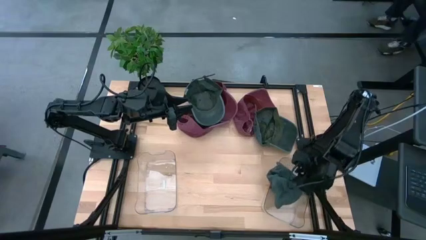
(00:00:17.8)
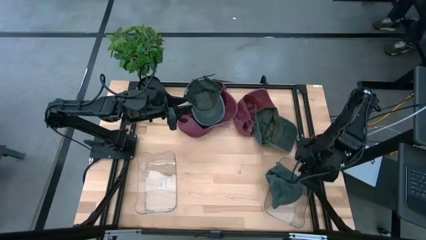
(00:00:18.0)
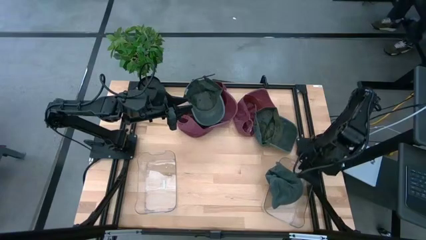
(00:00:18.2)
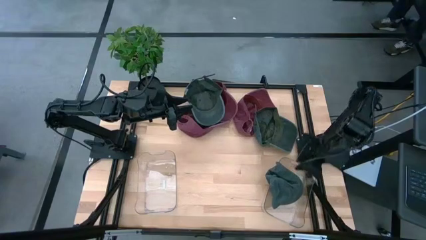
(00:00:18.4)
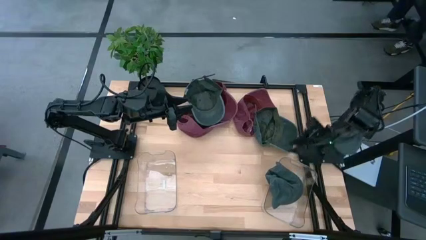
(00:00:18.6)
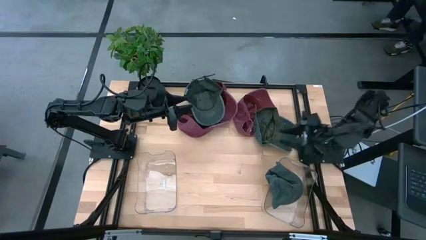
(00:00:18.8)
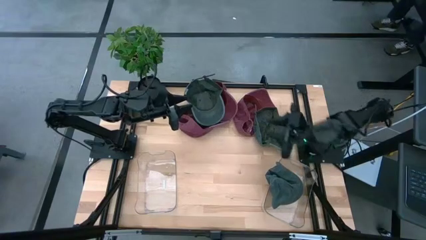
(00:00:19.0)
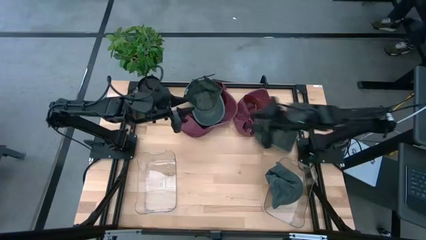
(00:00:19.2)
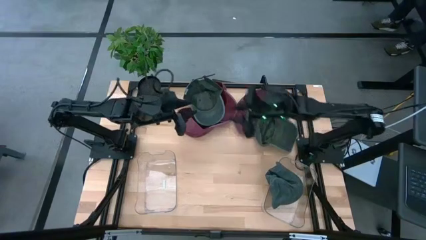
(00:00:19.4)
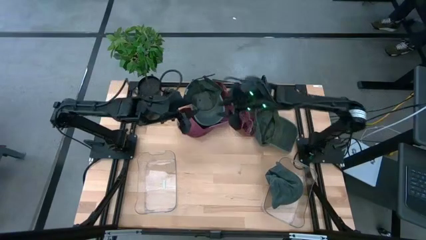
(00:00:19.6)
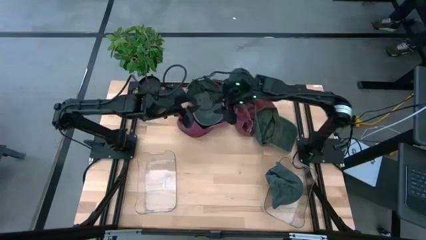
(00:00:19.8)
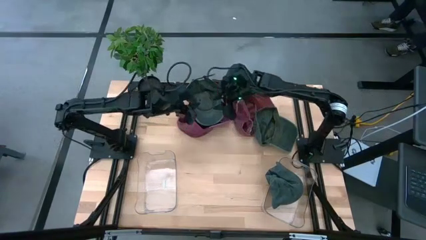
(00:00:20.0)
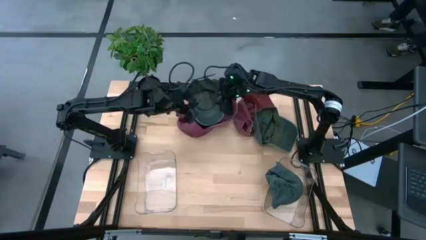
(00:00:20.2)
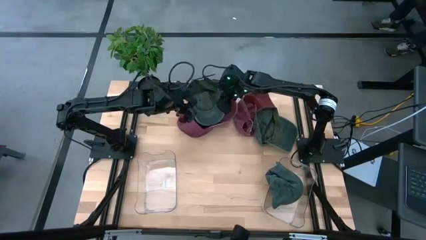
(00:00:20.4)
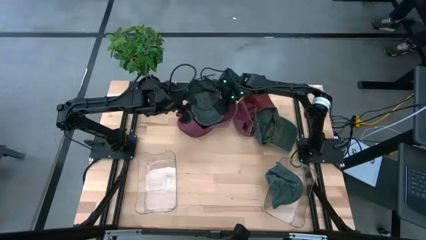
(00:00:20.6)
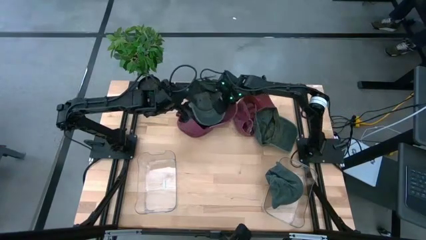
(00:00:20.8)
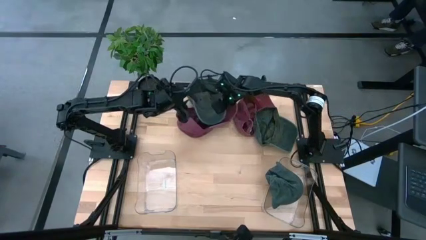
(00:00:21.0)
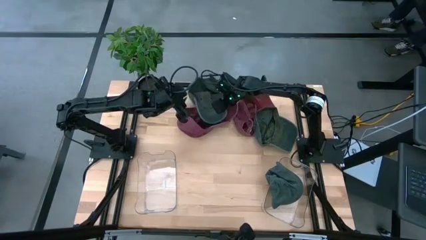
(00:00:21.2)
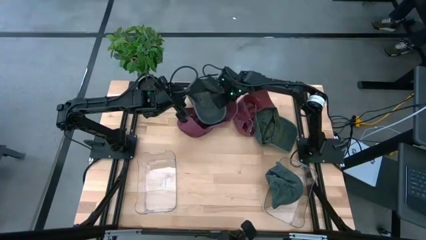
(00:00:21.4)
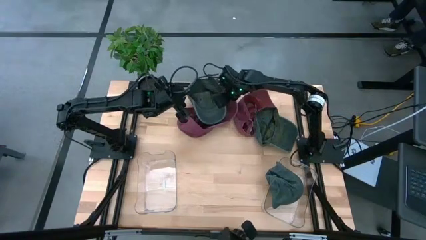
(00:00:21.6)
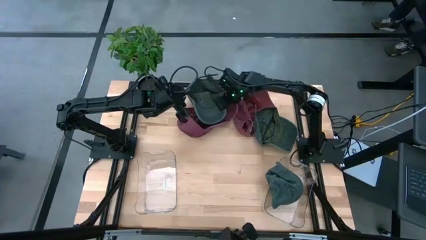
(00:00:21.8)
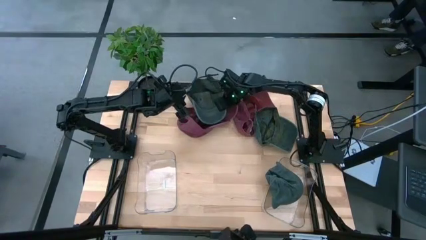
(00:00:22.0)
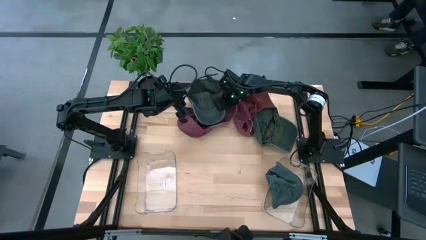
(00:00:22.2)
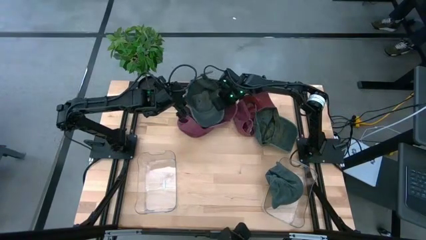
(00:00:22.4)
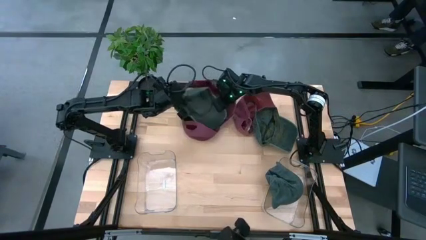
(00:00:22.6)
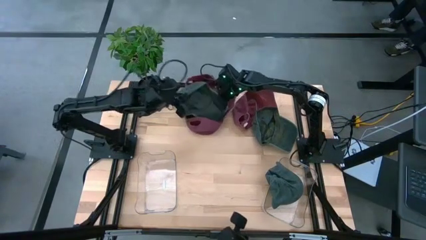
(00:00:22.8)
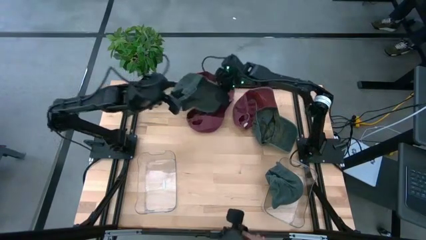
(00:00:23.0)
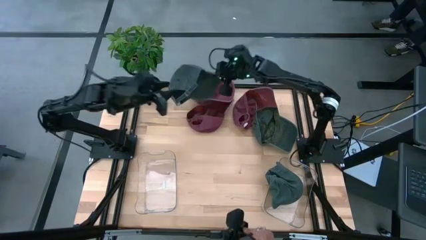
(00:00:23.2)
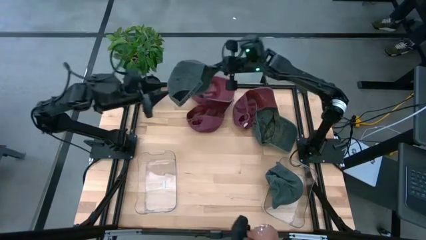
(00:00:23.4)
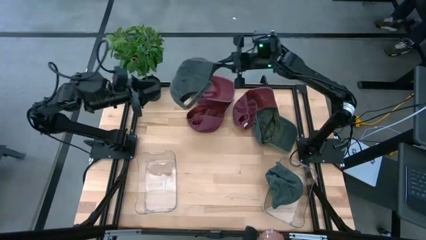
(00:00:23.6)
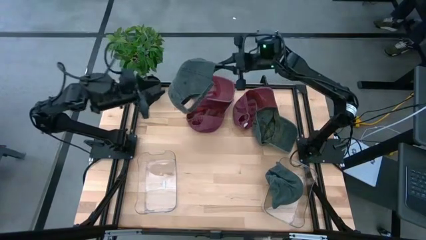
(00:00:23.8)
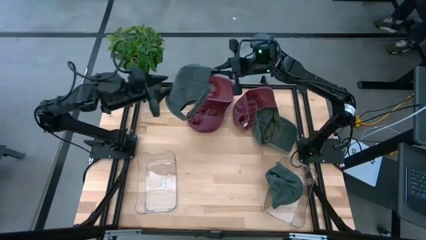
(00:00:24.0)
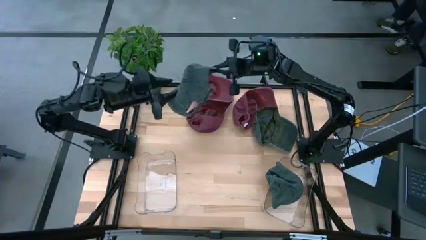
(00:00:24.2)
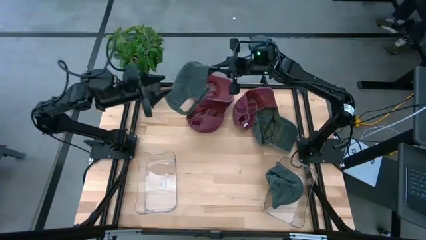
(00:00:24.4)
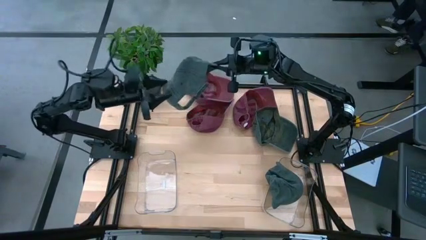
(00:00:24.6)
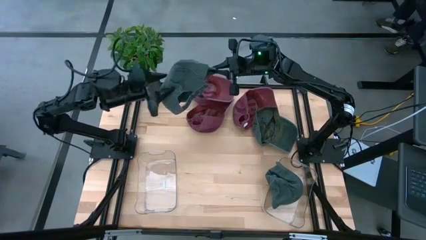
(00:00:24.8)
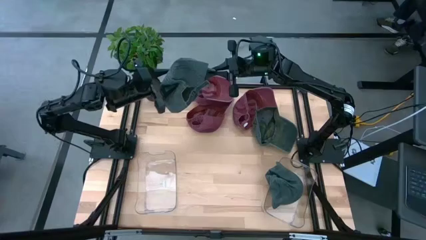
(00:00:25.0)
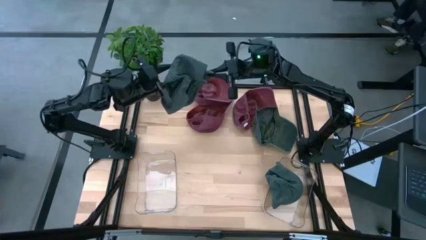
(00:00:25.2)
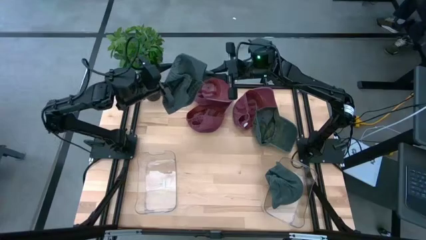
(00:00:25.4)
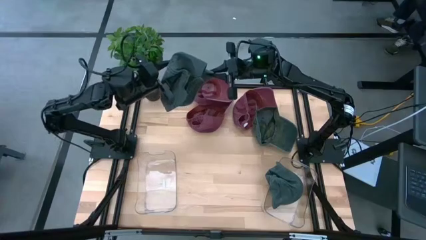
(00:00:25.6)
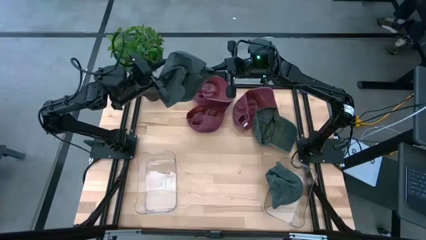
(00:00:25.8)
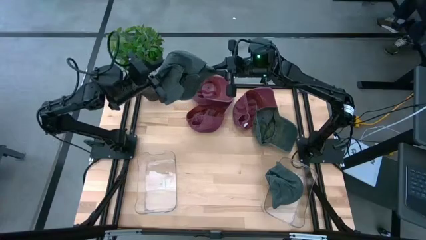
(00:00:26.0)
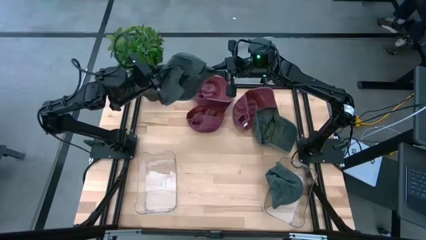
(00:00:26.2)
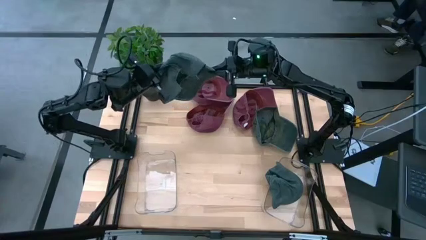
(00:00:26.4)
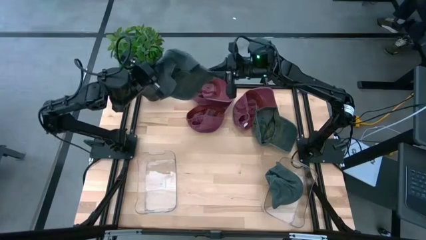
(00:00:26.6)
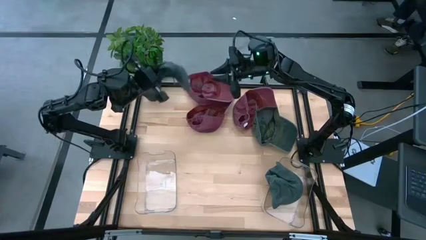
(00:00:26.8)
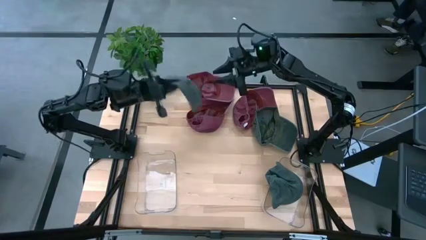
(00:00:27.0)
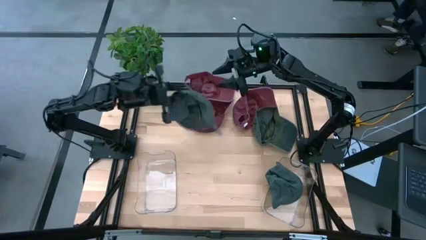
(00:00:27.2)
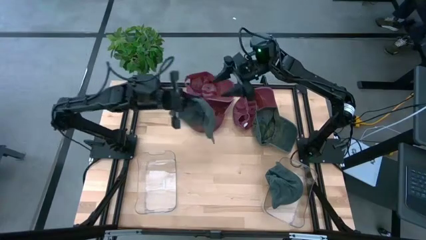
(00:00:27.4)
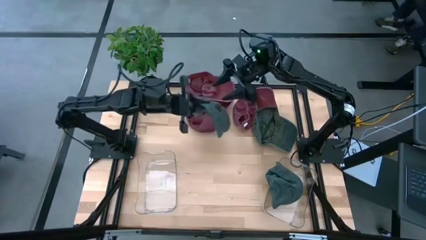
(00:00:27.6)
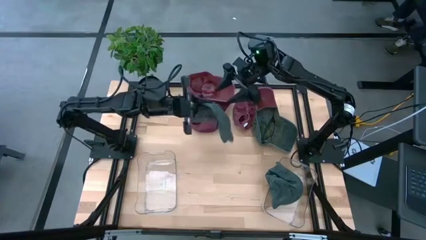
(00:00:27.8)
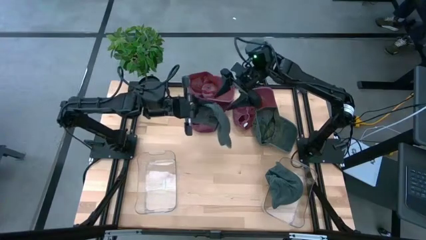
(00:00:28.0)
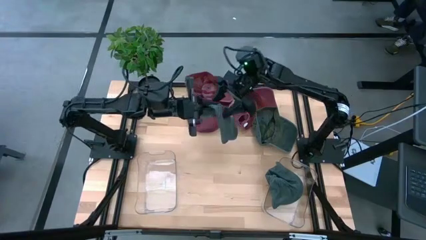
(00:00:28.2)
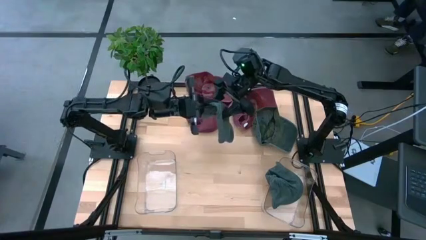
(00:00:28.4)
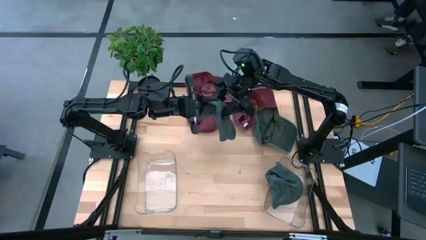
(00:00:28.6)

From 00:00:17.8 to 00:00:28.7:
Task: Pick & Place hat
Put the left gray cap into the right transparent bin
